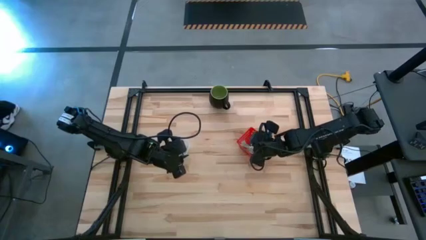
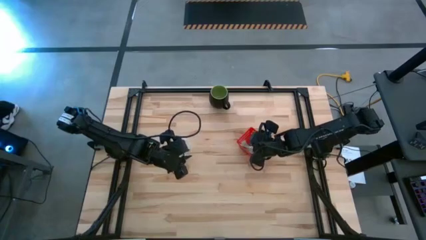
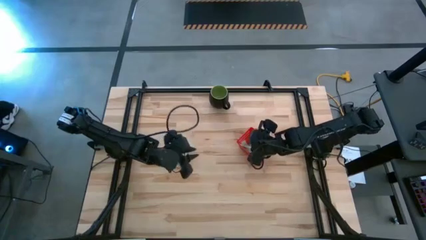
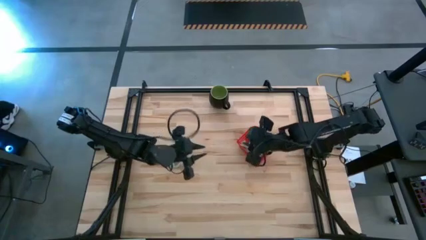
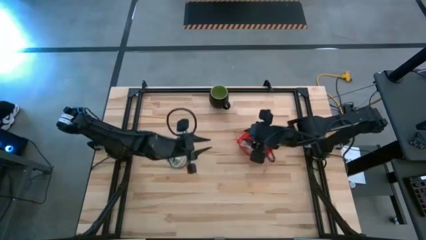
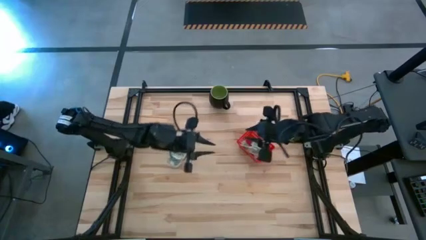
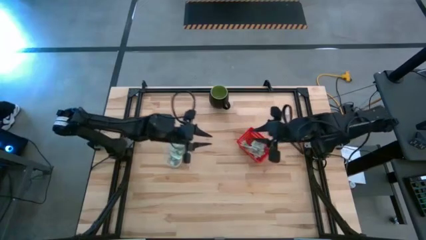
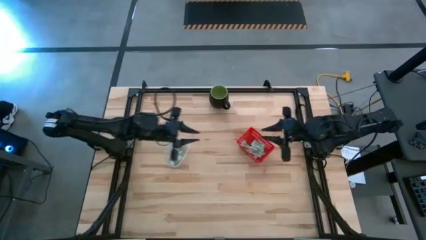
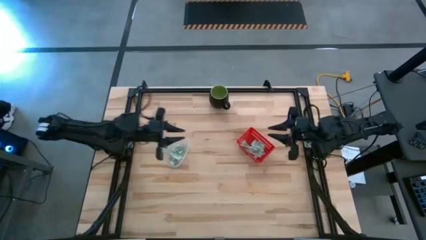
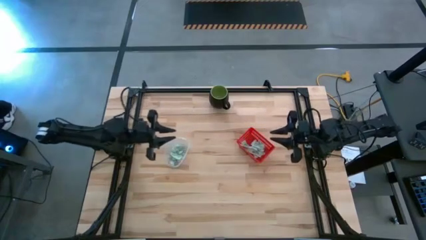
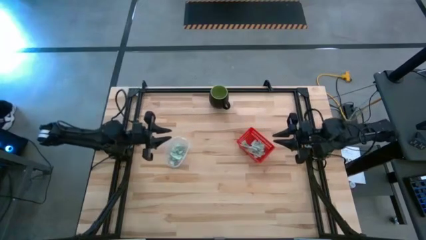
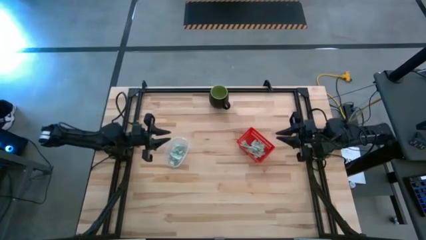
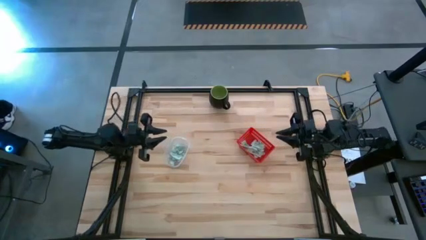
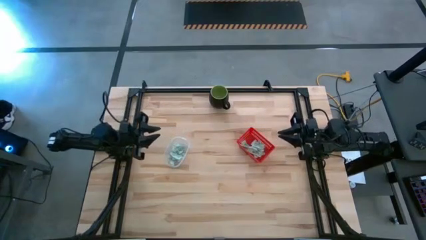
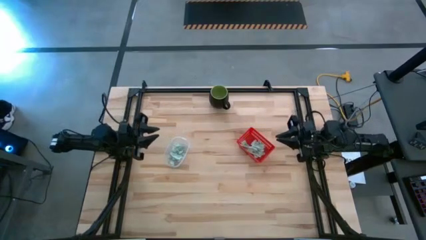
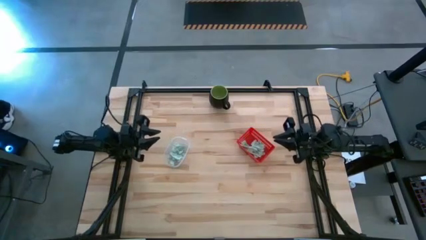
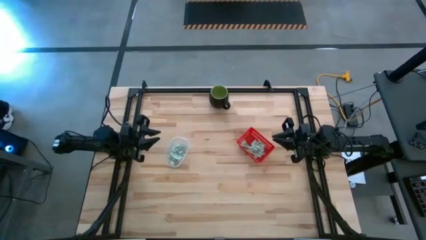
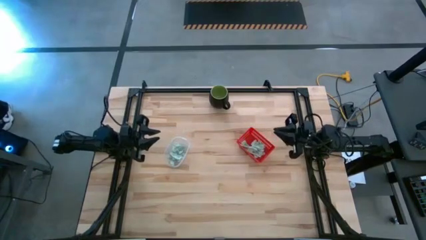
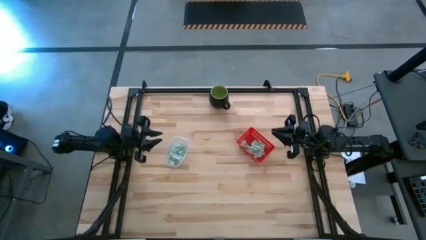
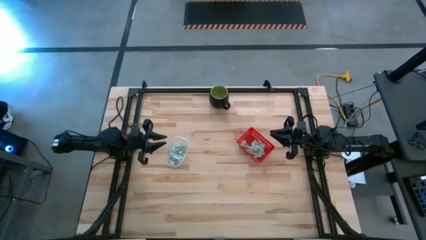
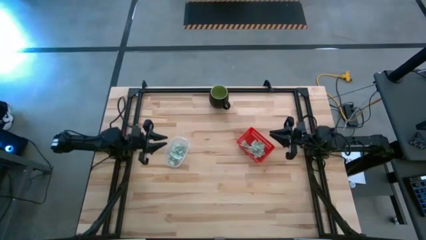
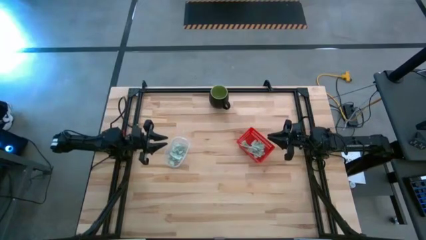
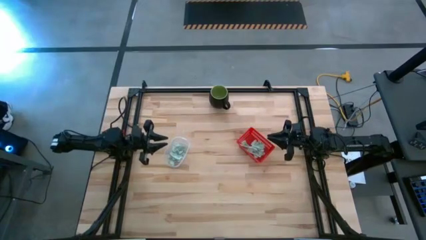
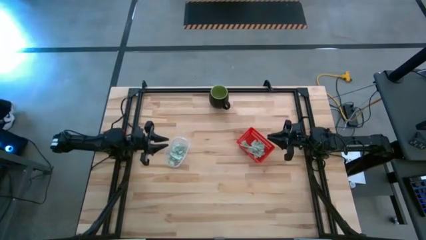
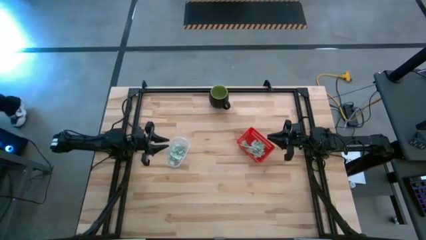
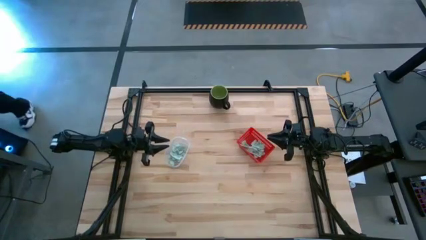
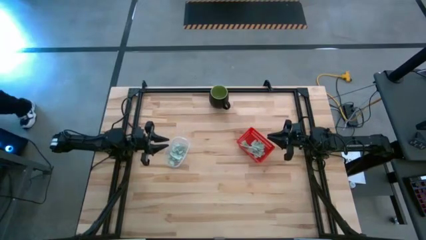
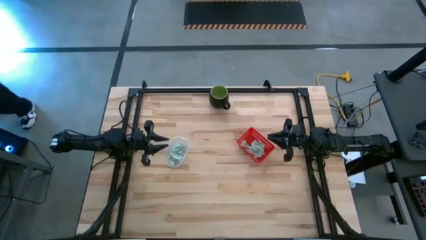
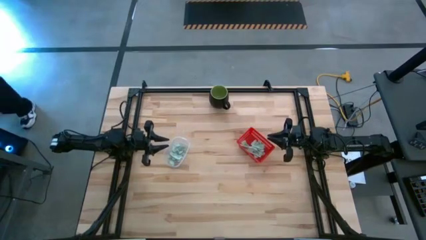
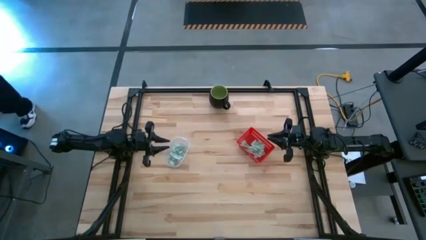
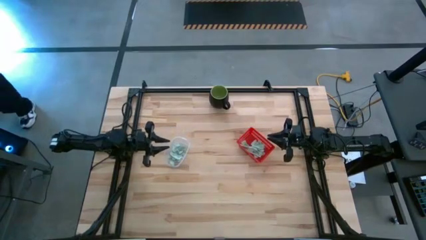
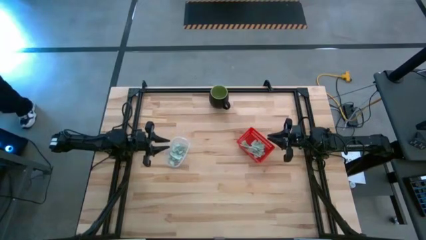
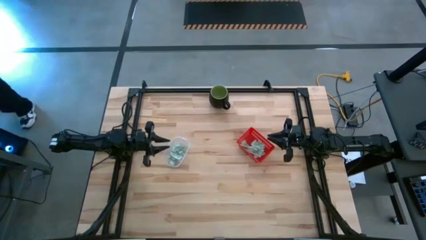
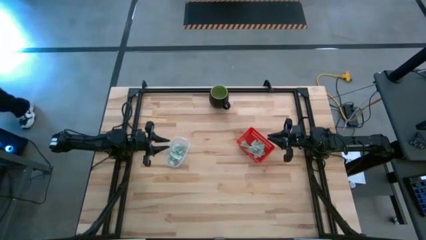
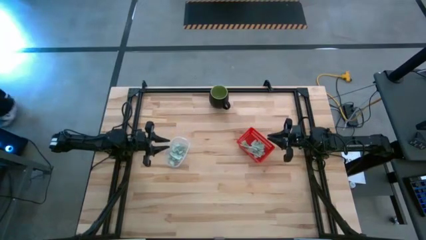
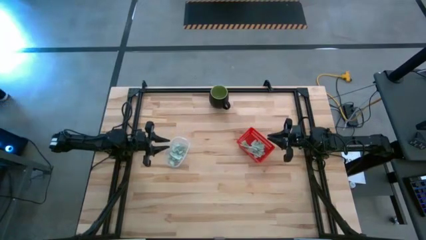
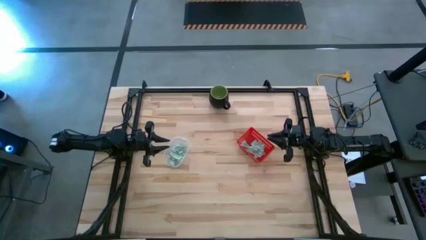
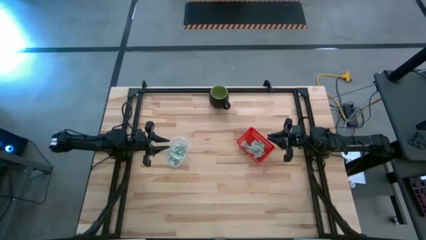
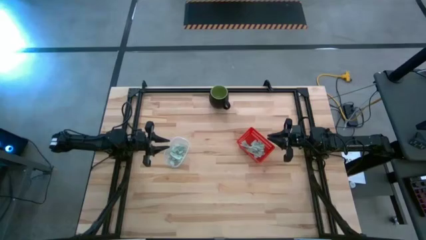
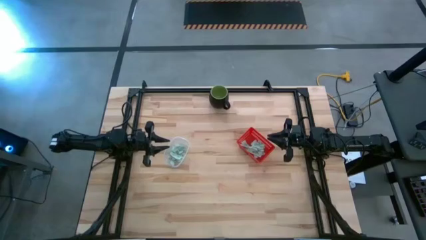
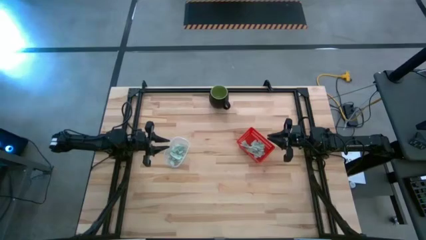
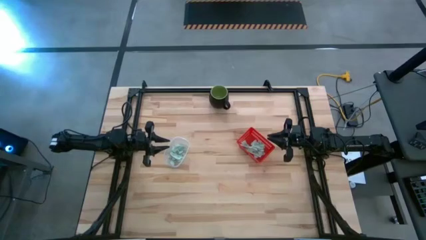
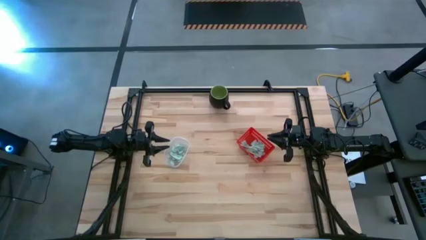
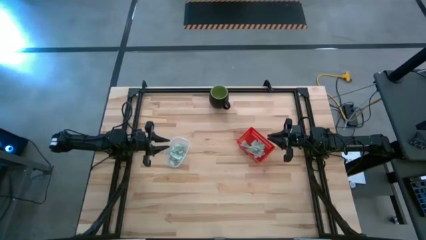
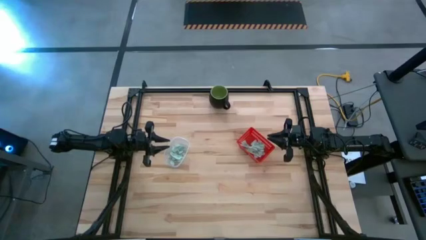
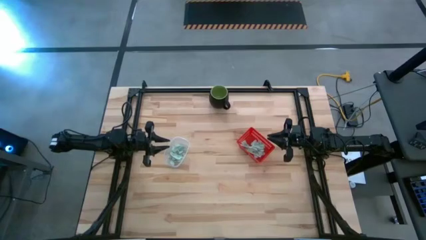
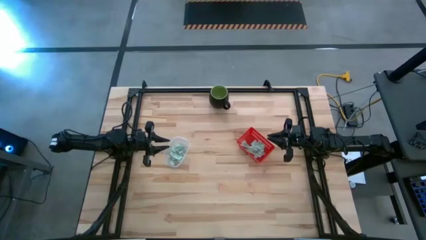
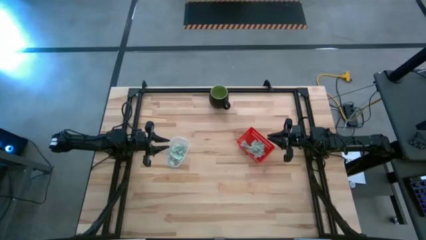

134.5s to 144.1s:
Task: Pick and place items into bin
Return to Home Position

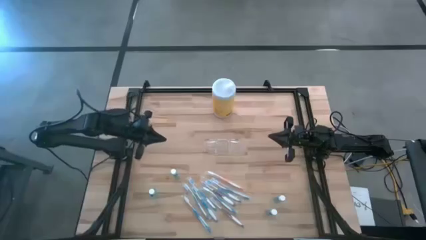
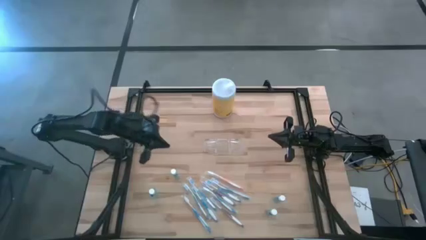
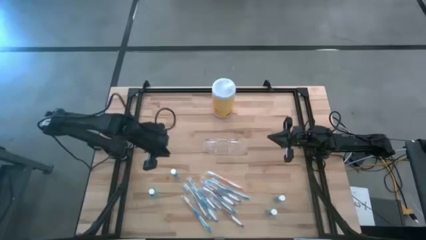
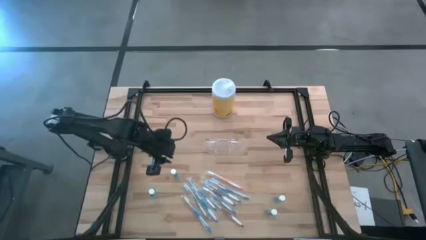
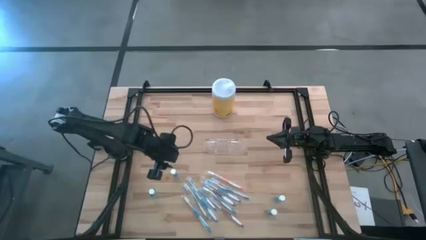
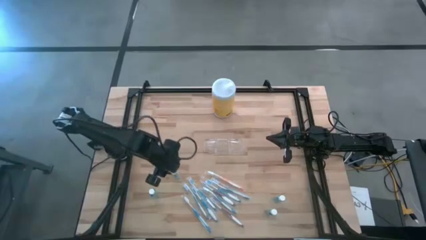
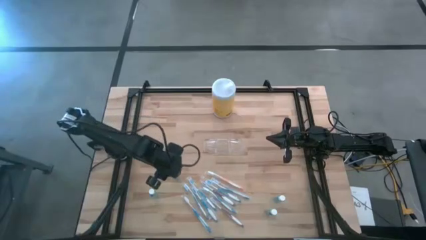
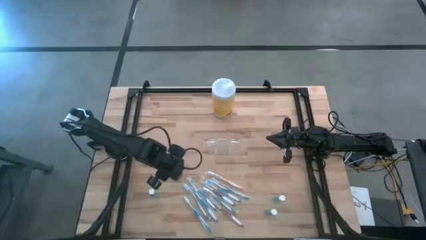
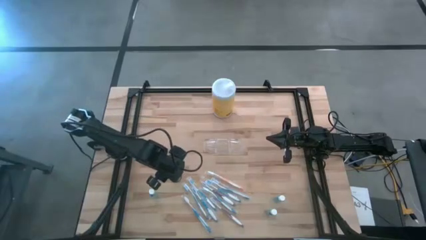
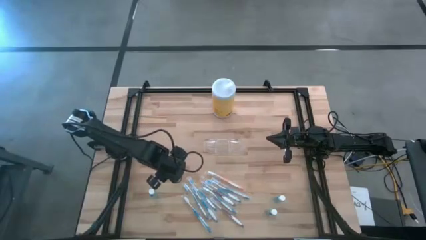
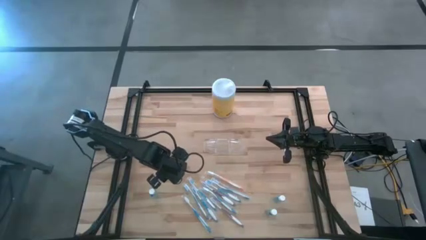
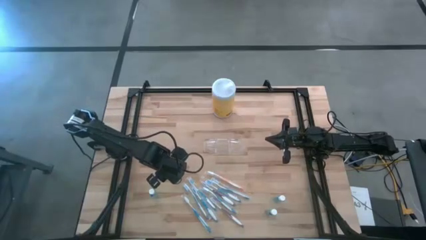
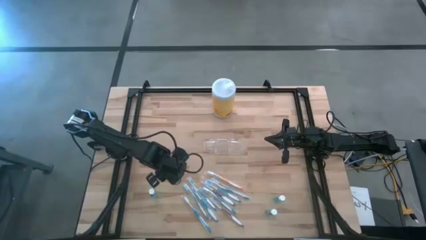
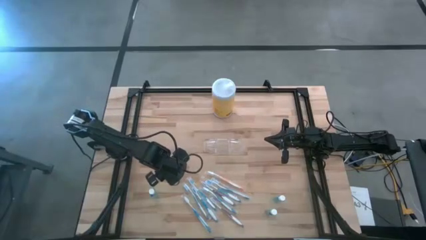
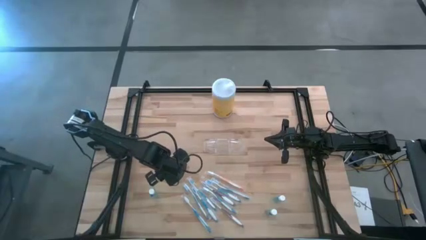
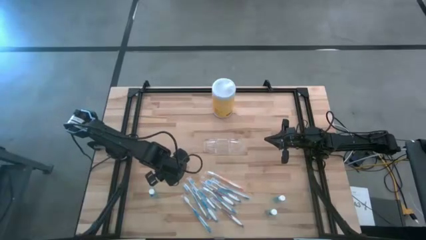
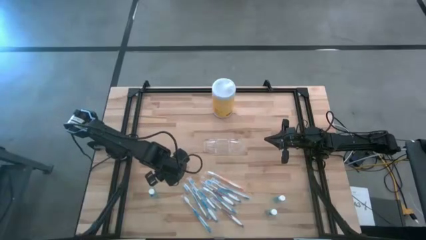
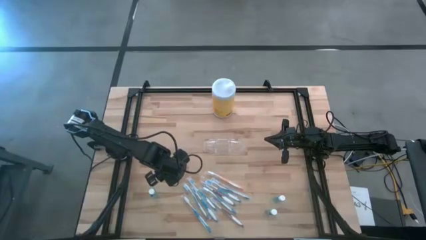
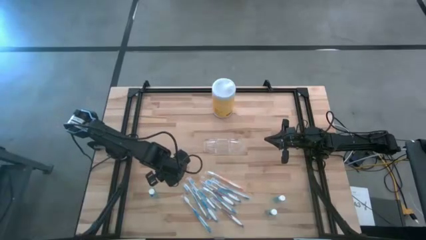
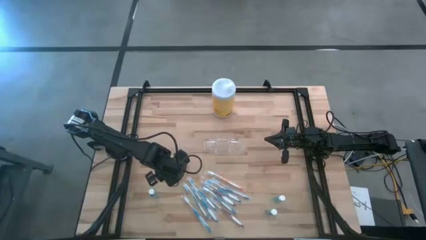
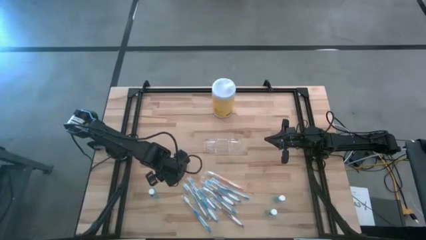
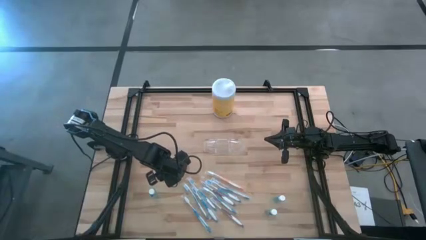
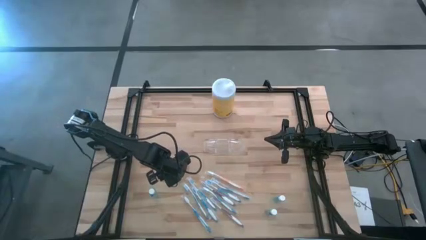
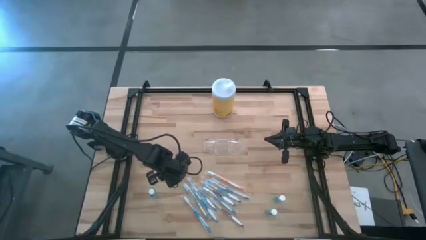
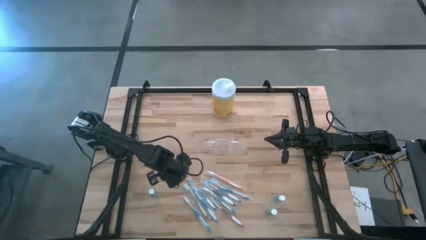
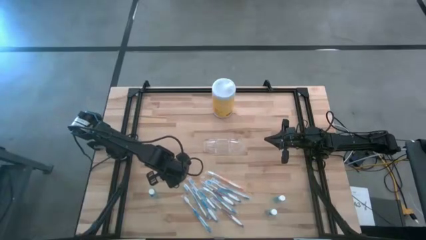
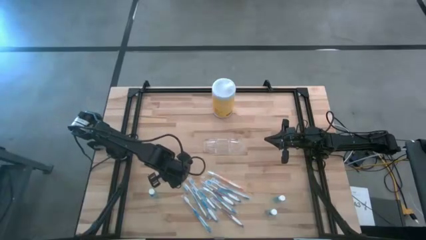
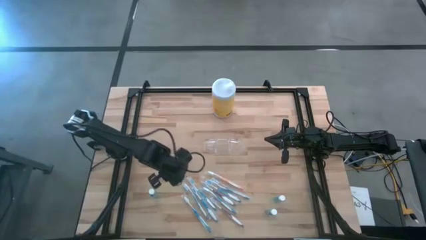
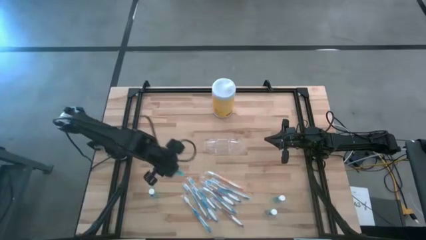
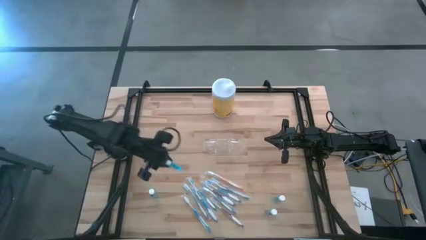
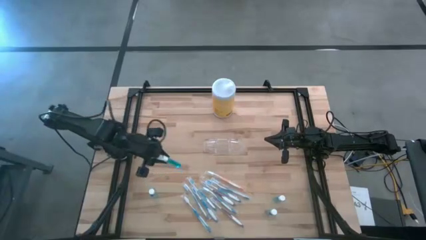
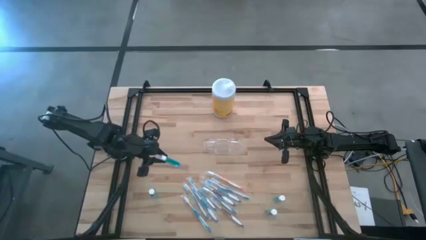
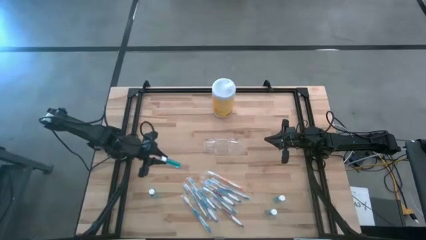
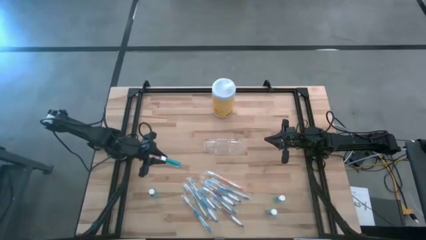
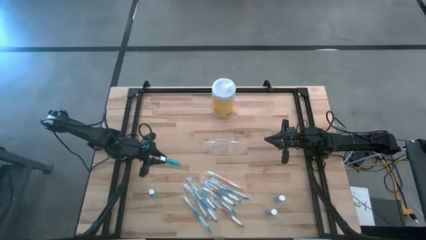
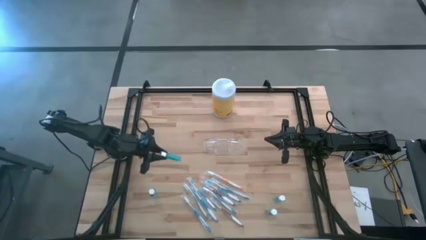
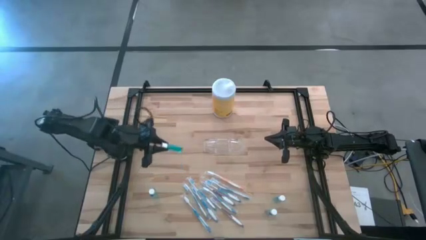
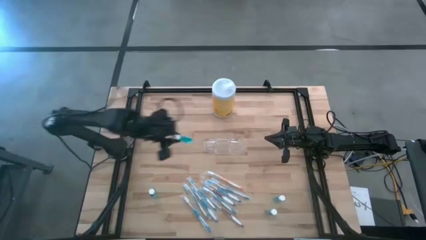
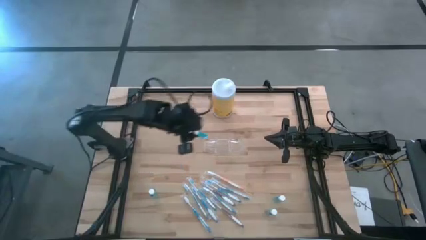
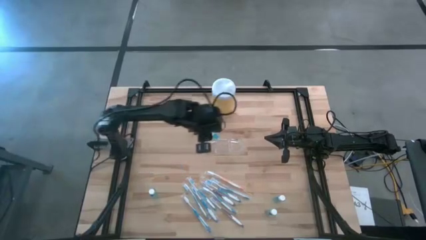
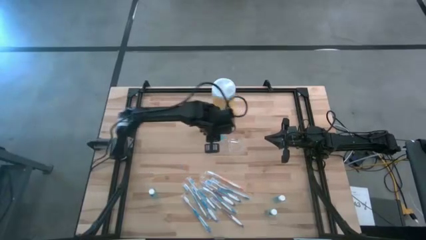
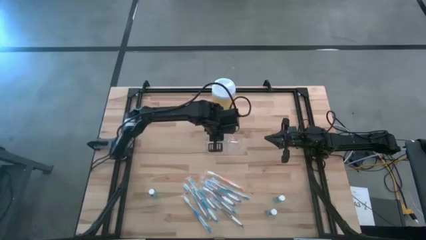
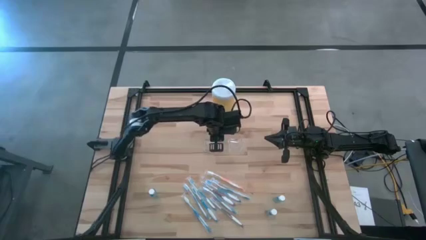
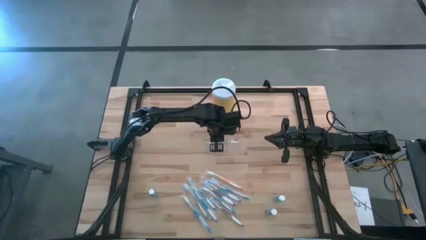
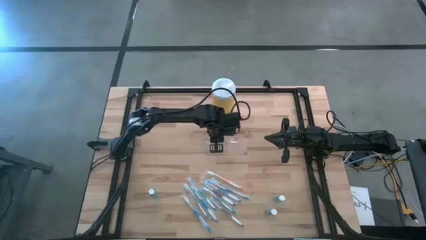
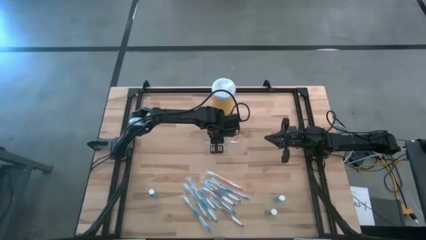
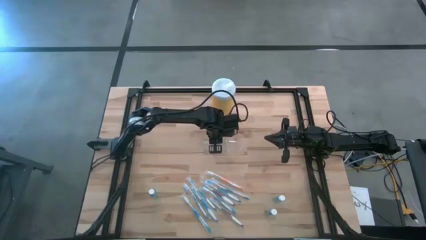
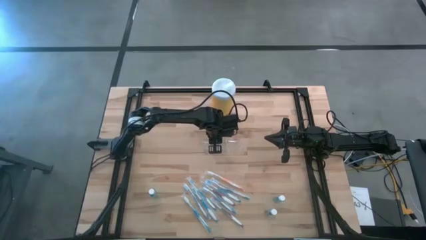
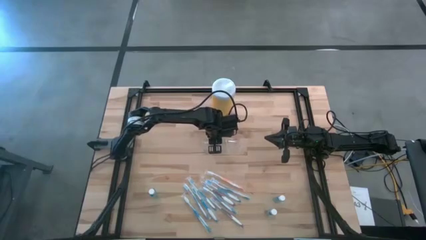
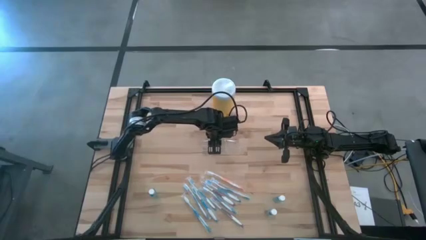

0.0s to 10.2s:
Task: Pick & Place toothbrushing station
Put the mouthwash into the transparent organizer
